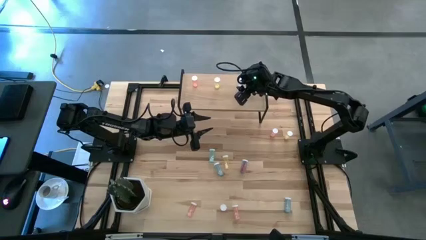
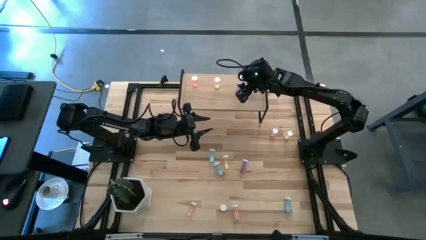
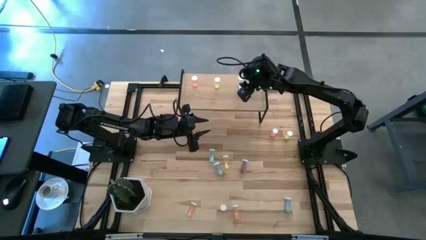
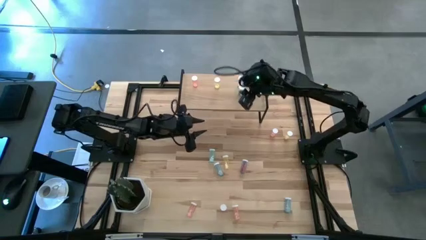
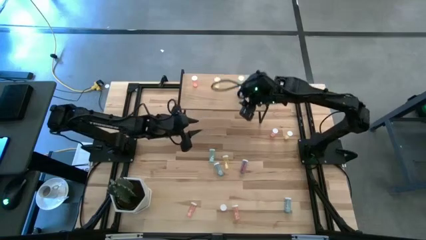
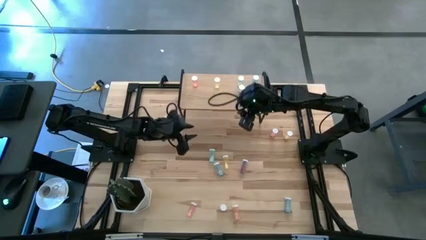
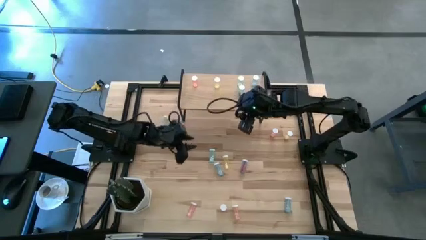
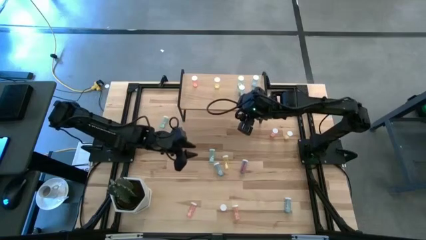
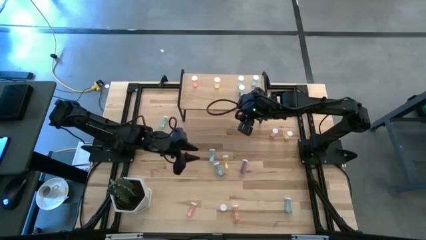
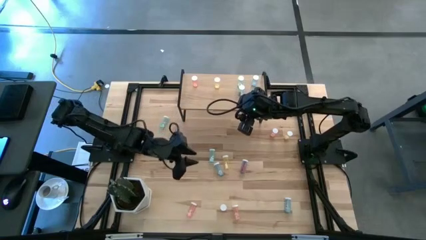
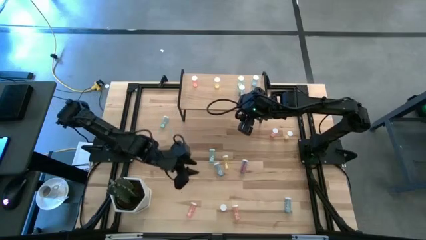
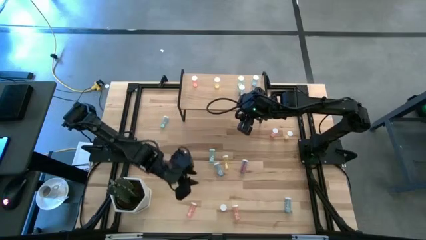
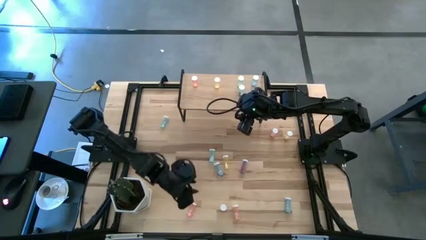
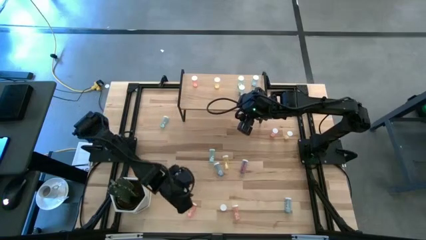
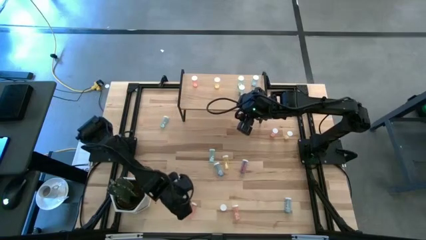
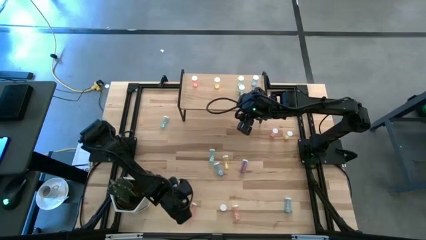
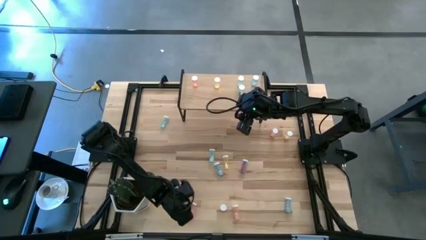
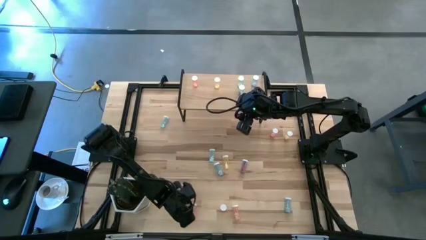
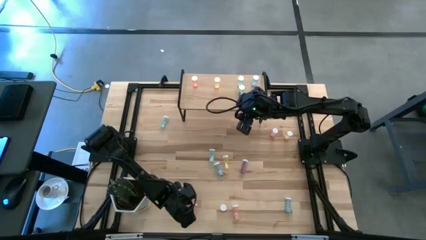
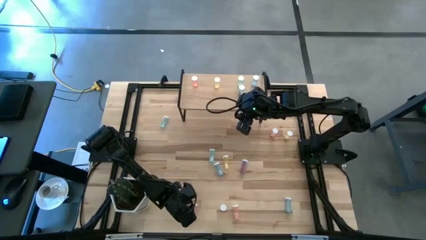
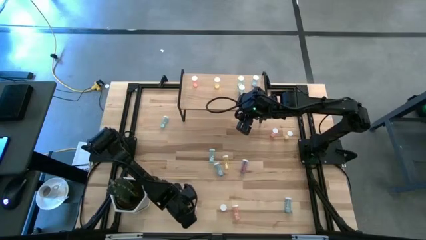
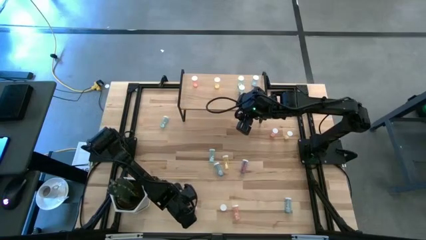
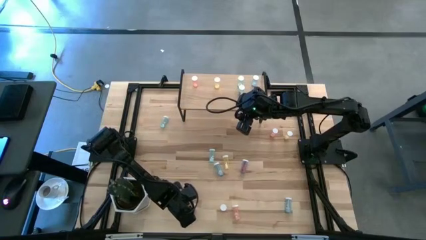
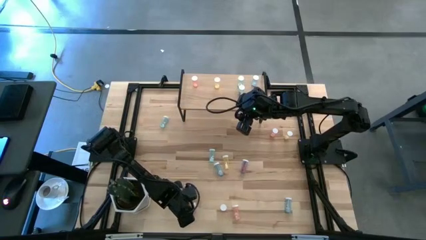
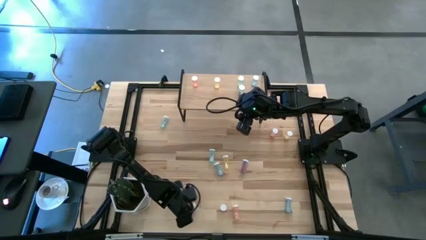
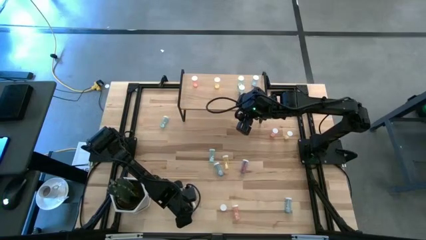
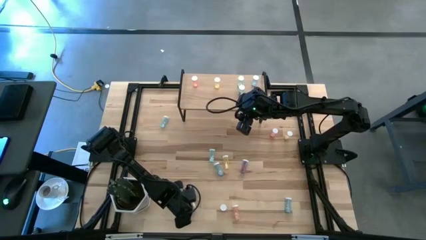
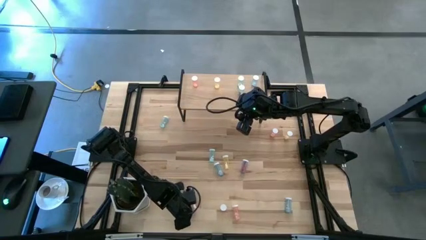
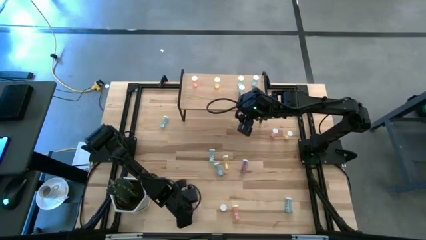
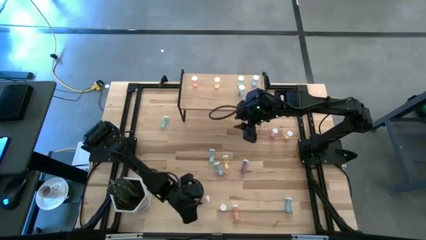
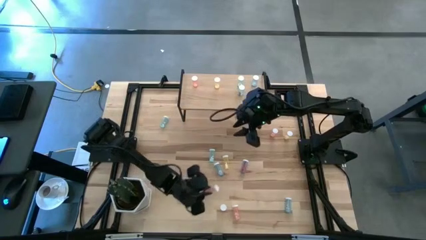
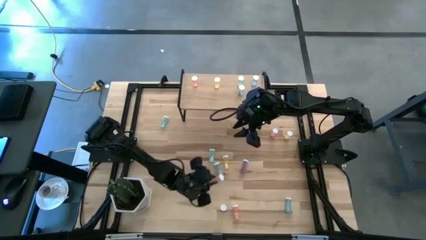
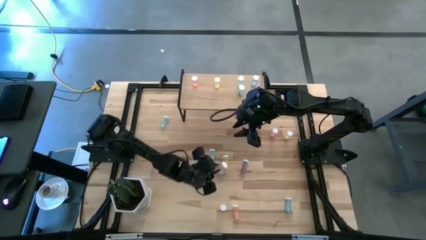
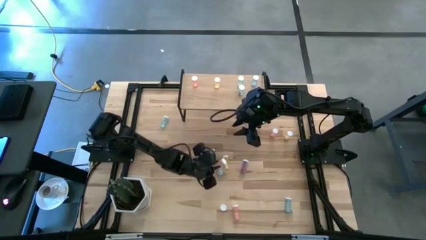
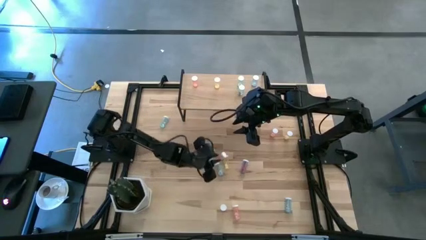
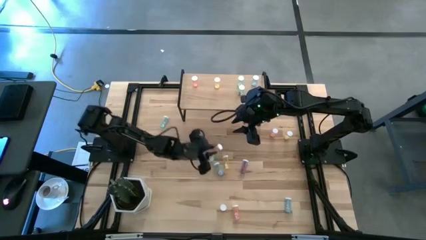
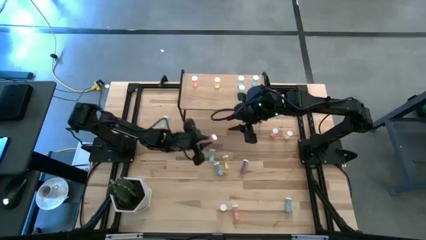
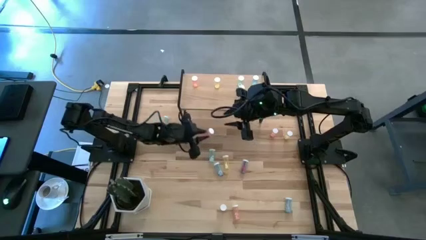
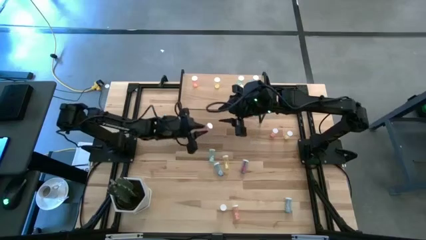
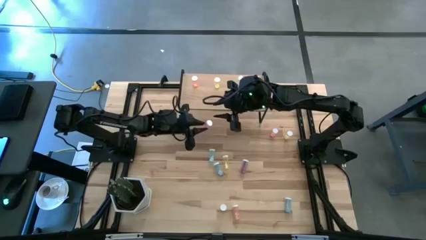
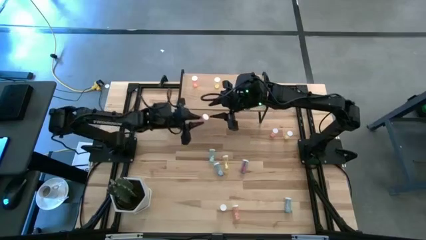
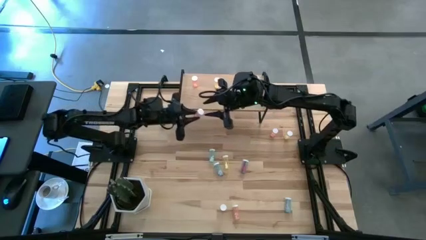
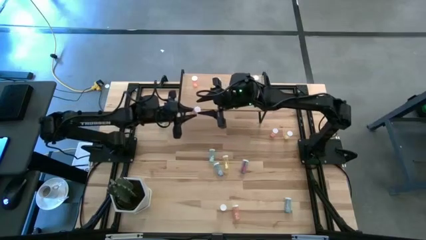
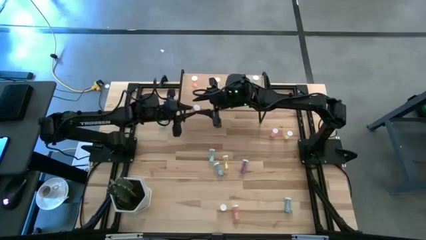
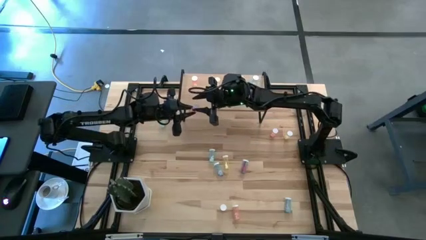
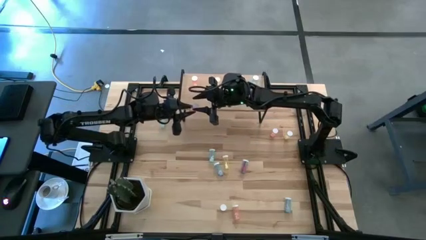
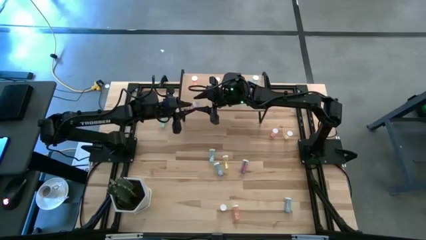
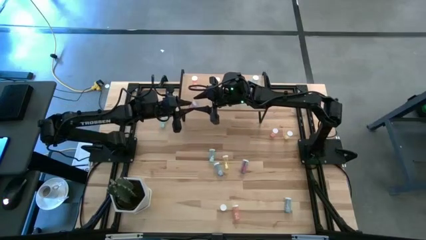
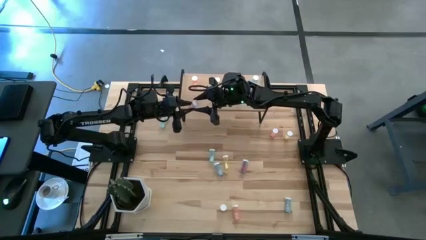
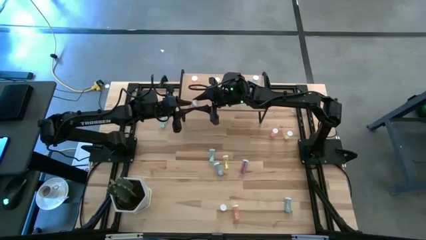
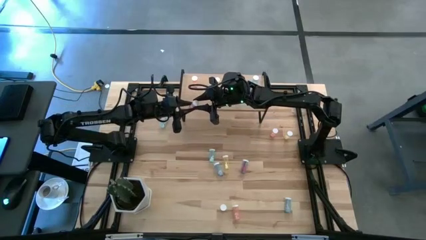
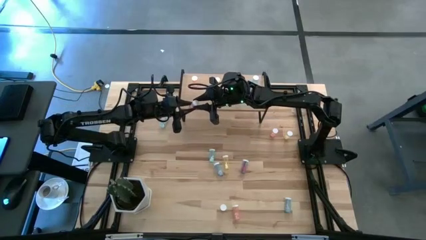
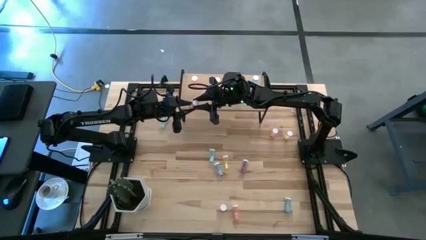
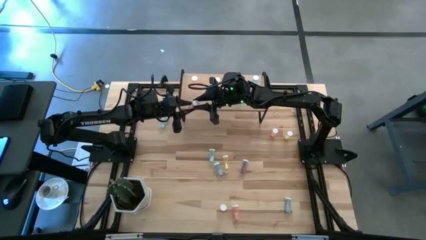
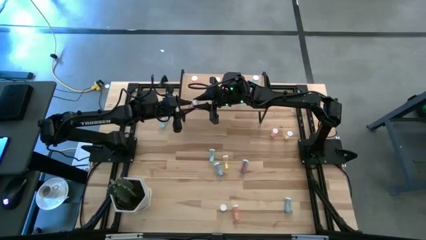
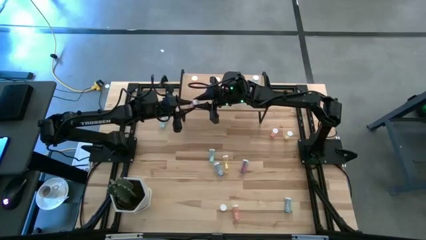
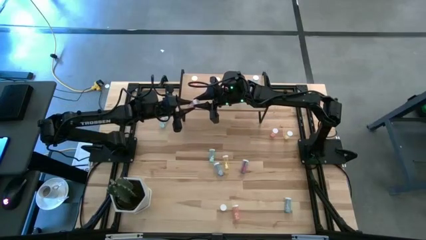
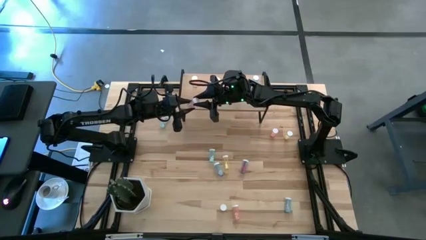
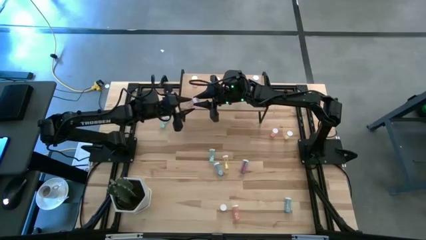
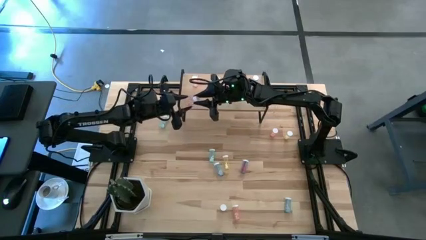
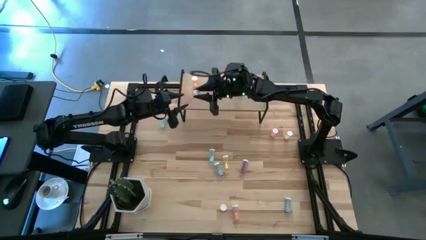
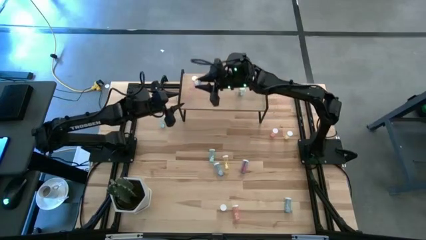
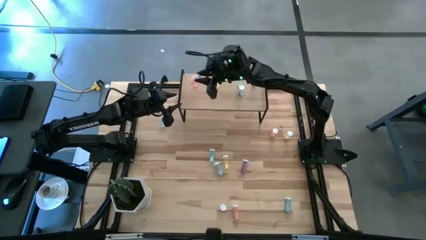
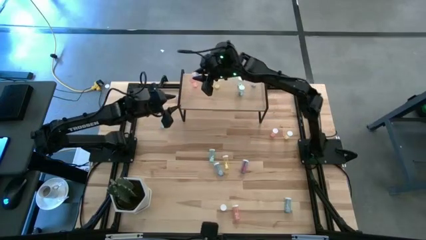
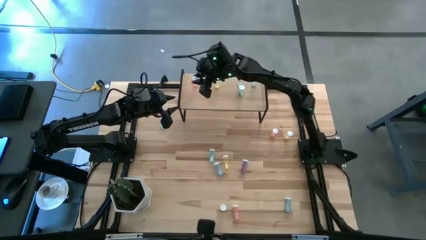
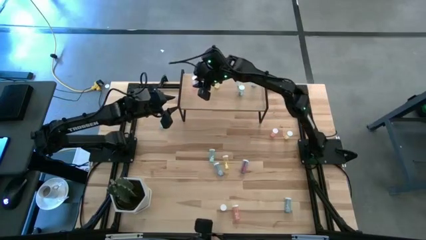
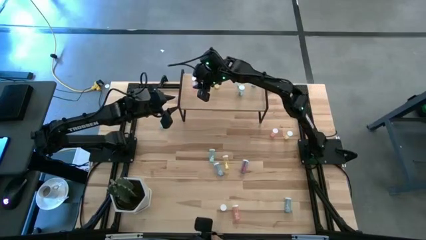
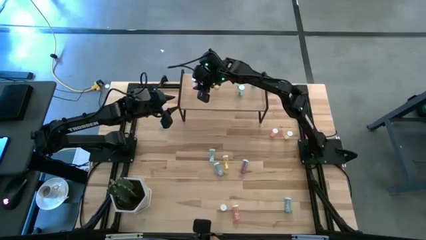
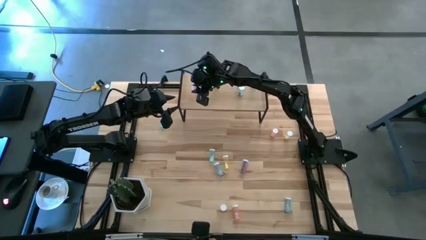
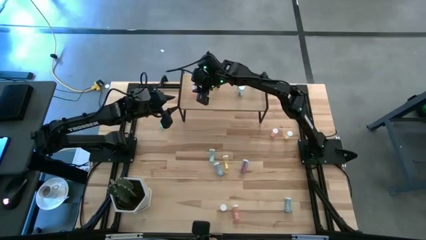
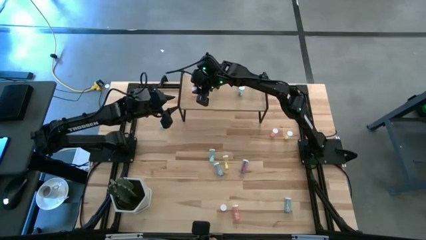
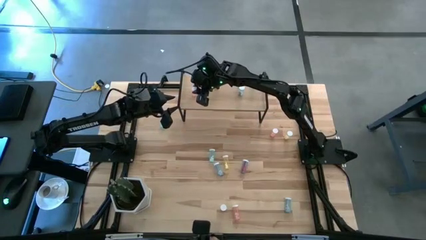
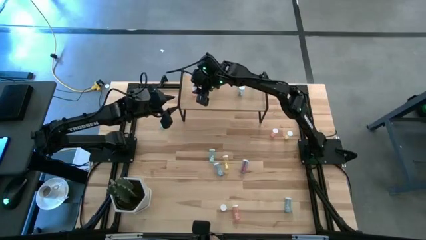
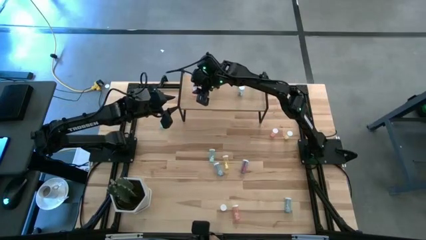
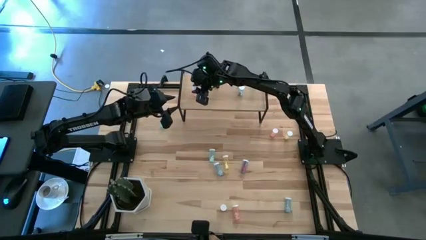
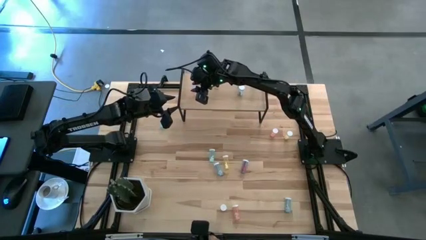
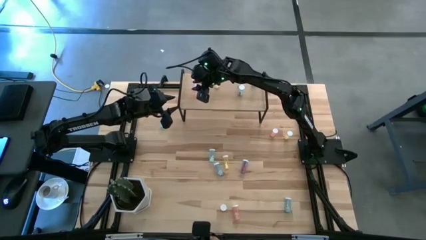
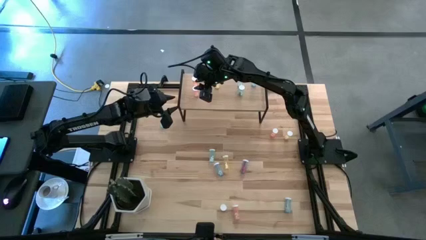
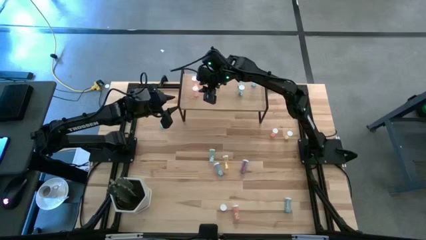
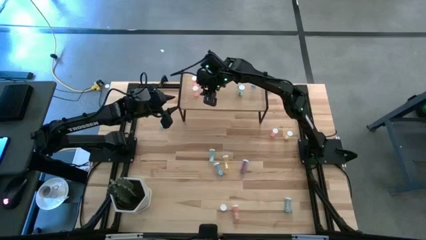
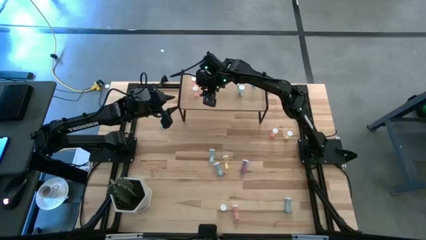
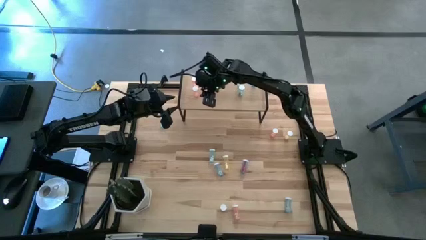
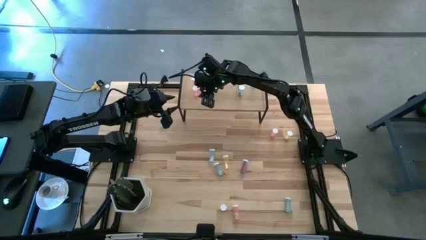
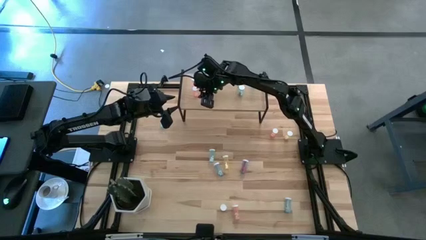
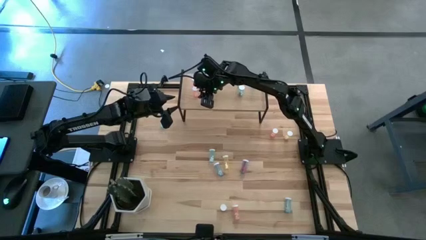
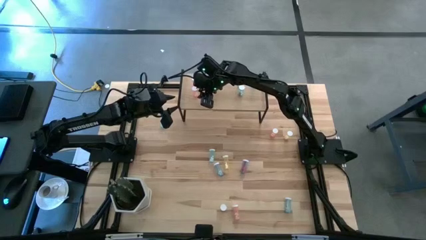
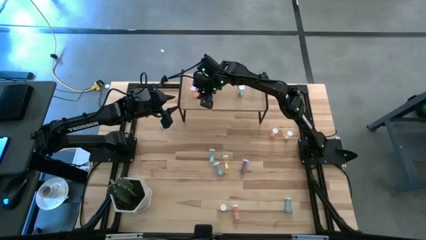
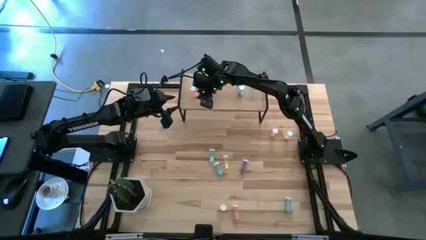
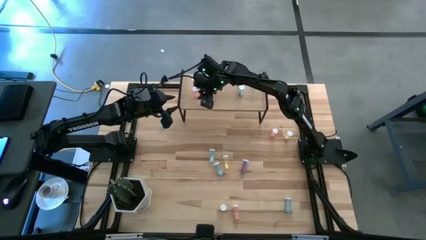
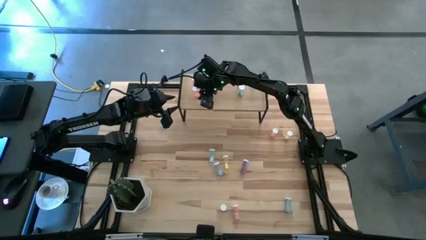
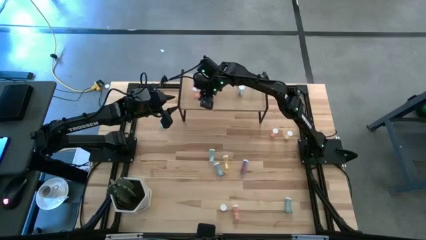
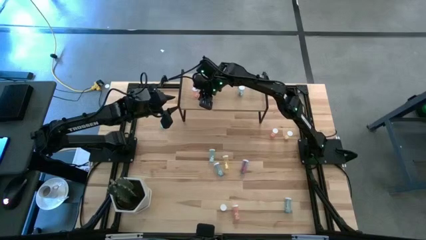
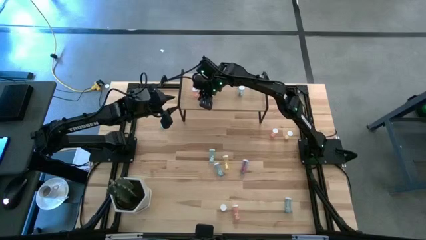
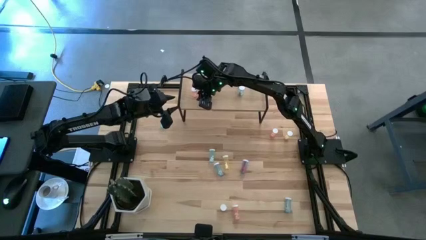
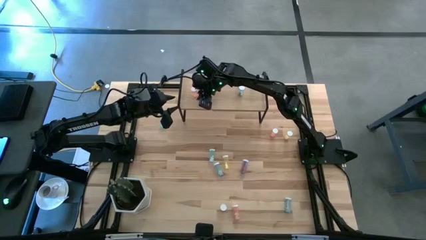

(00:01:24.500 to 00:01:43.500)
Task: Pick and place medicine bottles onto shelf by color
Put the pink pill bottle on the shelf aligned with the other pink pill bottle
